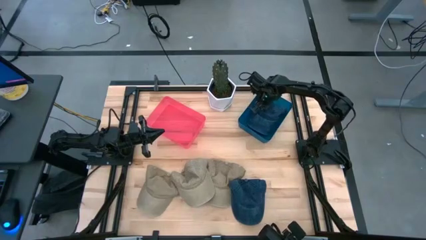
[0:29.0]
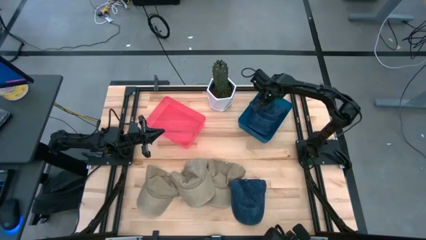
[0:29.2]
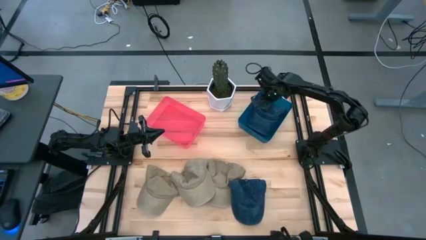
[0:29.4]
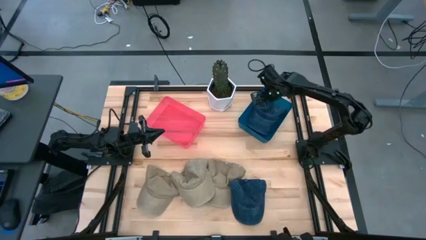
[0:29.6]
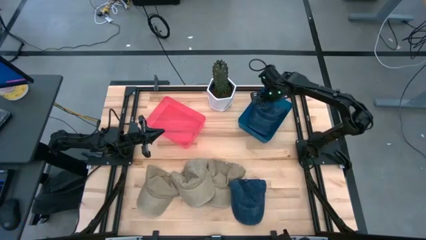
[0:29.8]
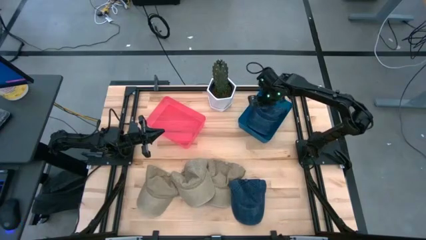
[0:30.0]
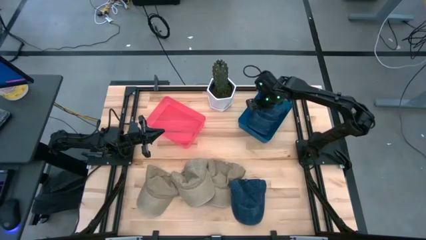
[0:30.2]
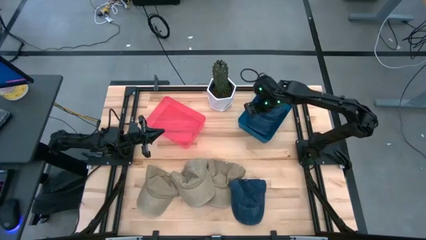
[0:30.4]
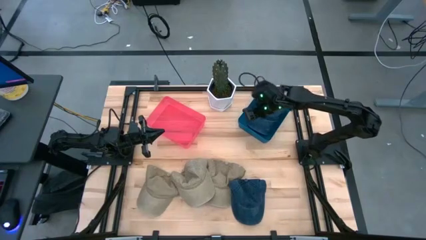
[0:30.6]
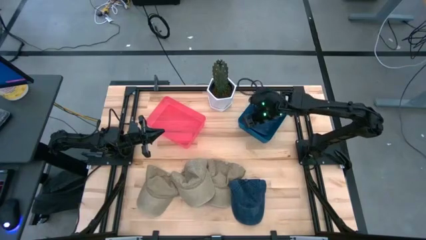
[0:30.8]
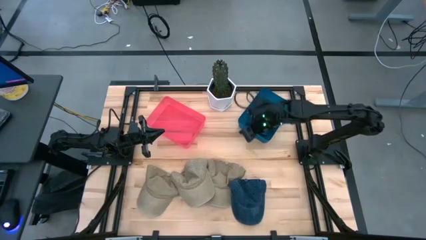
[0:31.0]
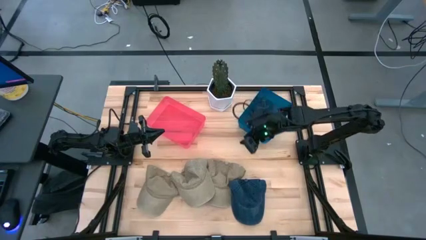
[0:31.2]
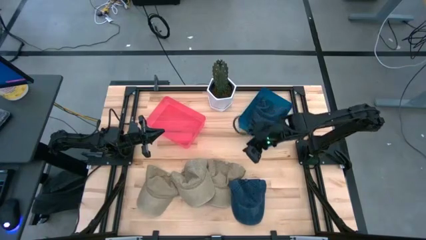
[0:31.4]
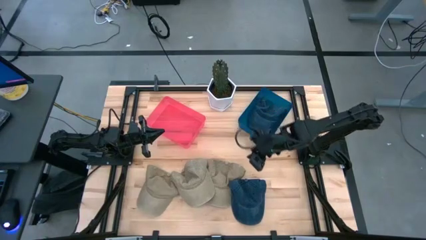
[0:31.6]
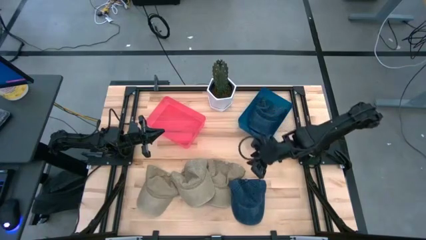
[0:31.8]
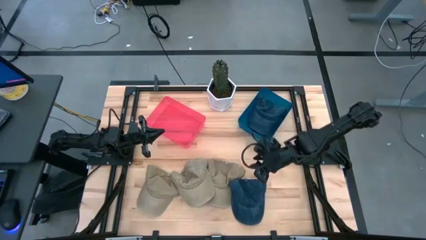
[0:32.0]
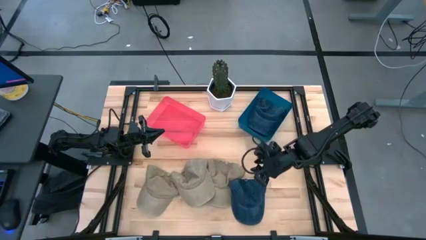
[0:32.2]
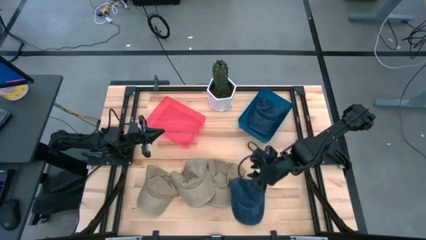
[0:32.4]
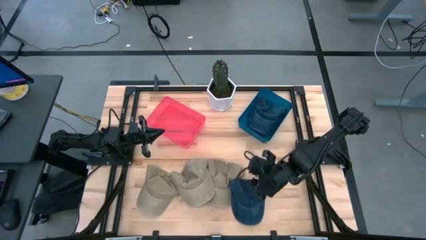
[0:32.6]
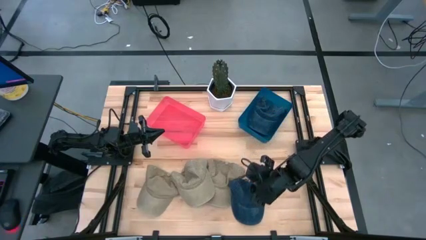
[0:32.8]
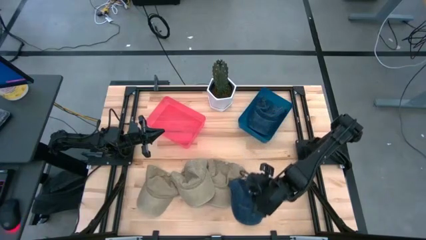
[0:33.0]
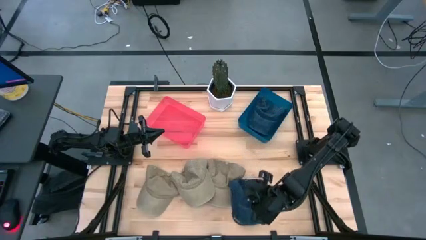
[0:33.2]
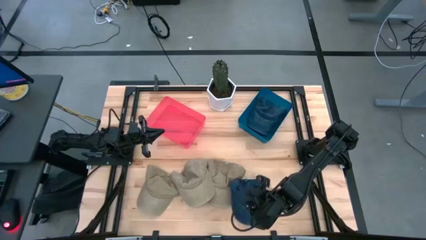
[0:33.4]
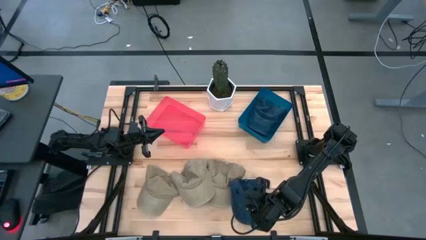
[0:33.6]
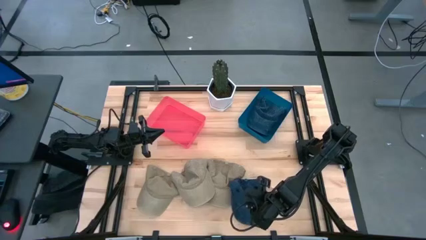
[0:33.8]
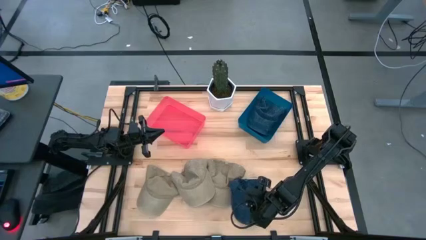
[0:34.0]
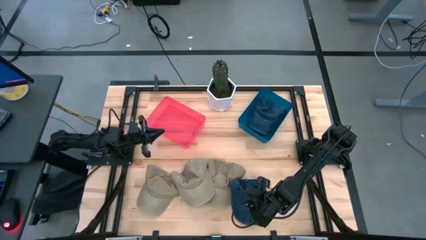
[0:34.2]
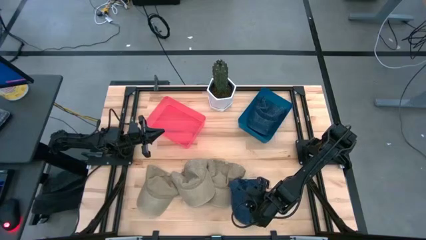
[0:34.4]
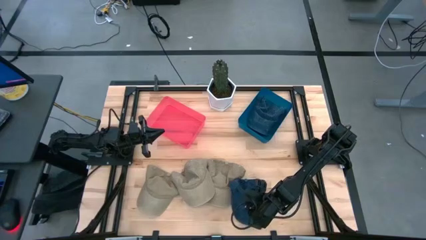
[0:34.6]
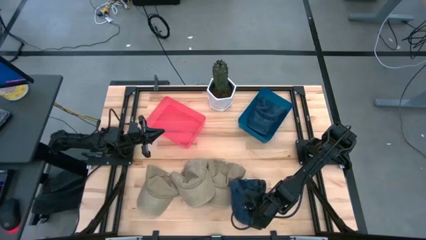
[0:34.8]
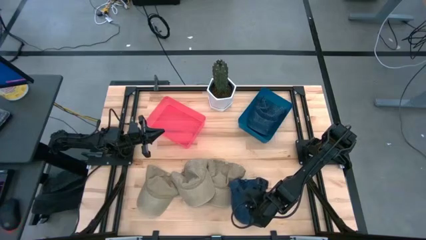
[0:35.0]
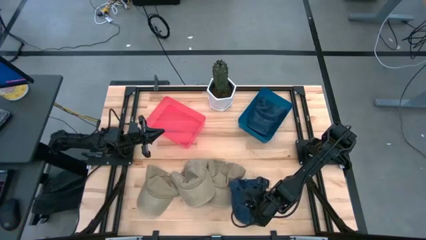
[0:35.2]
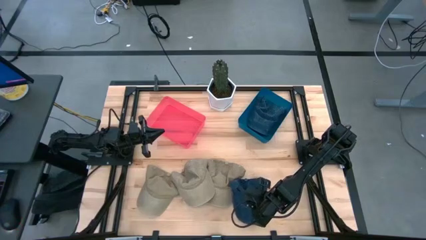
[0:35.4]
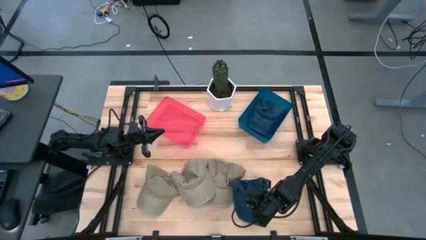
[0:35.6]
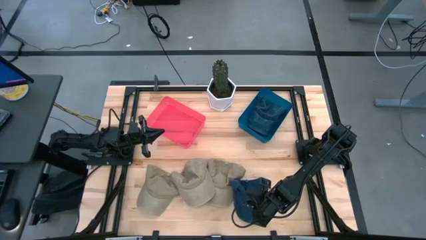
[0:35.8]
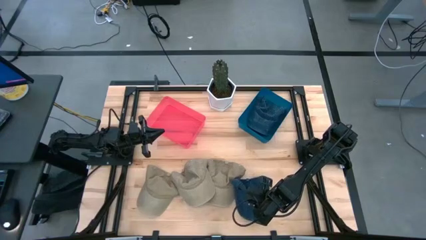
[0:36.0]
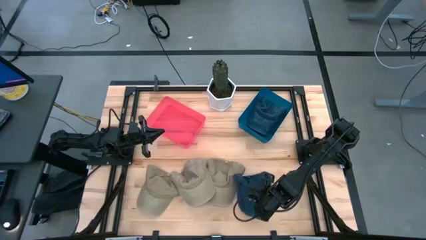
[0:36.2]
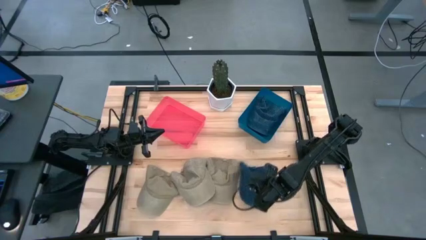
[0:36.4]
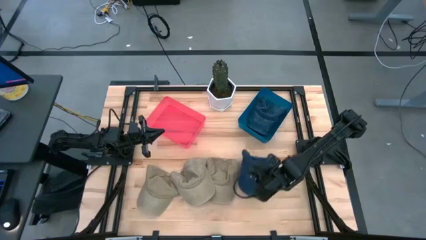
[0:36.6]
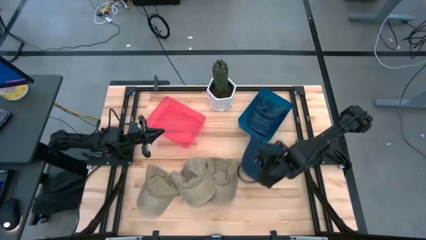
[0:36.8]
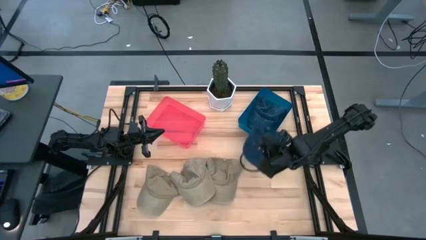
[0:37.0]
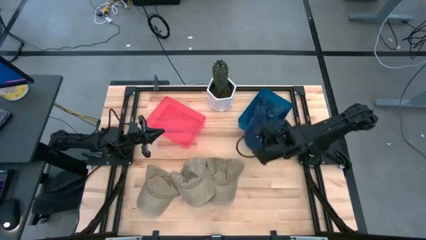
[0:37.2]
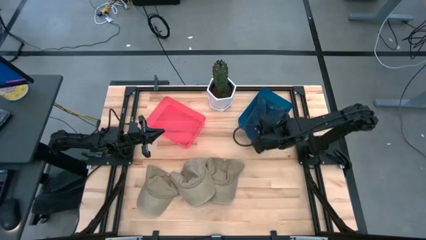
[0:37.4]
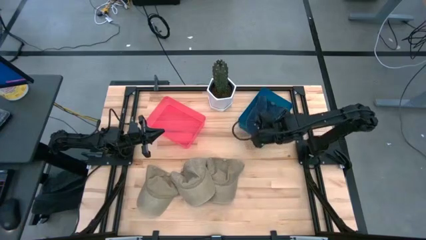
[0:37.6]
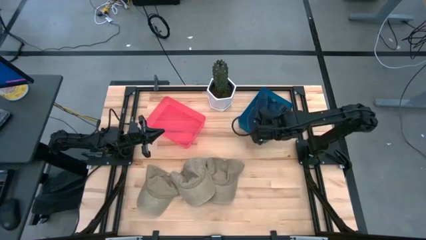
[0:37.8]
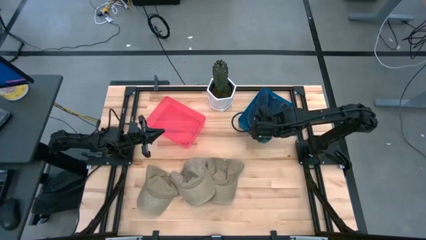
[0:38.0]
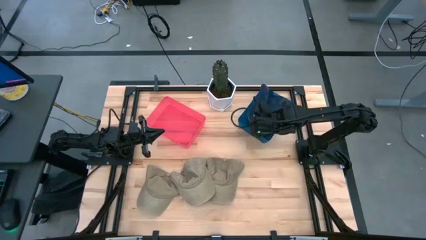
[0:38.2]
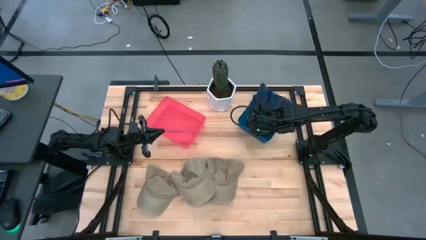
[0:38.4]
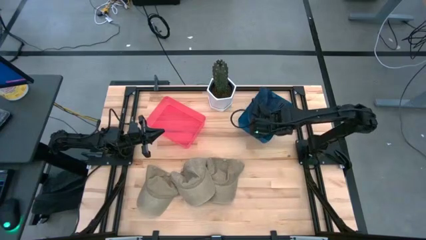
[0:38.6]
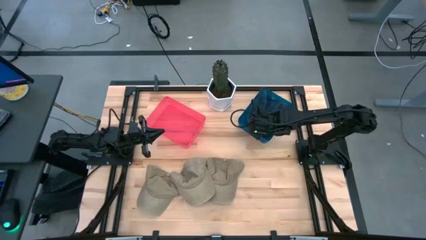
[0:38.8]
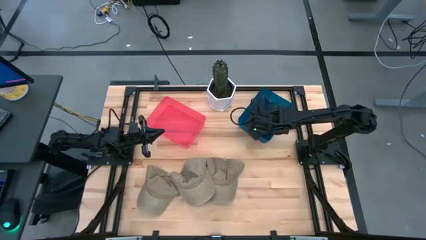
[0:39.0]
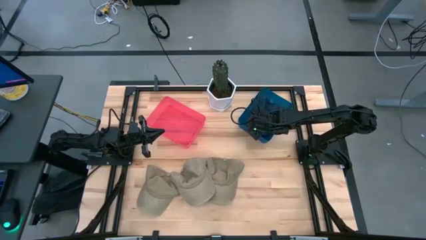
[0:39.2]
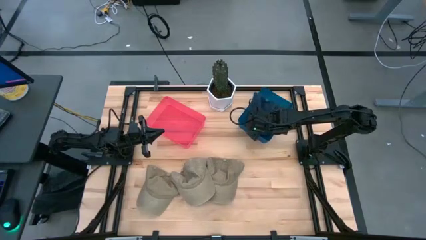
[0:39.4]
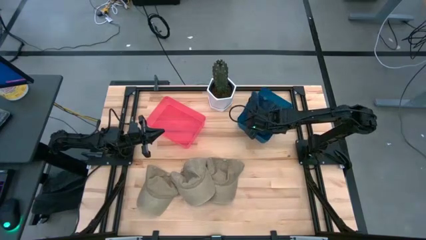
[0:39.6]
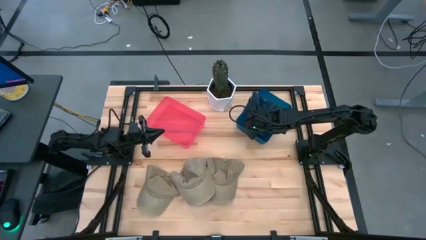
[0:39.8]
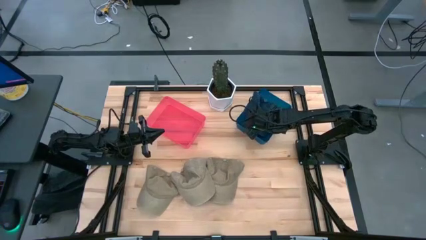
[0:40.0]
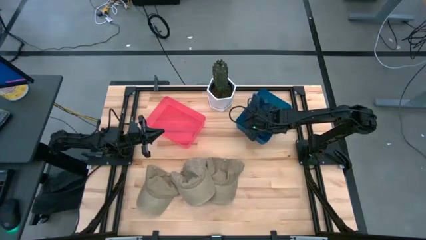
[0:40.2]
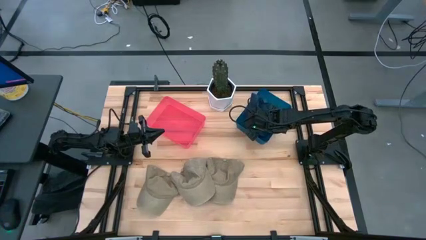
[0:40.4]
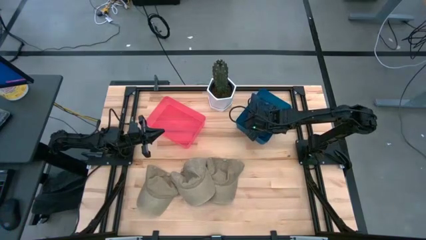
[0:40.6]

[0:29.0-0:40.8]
Task: Pick & Place hat
Put the blue cap into the blue bin
